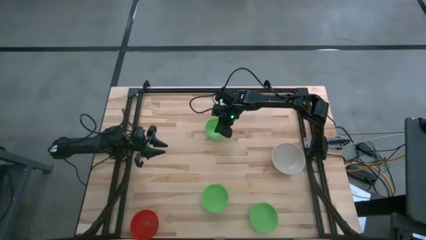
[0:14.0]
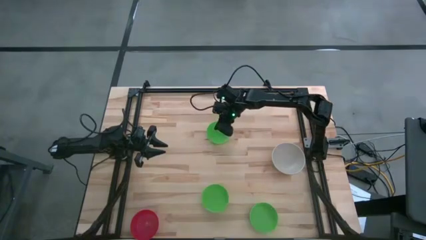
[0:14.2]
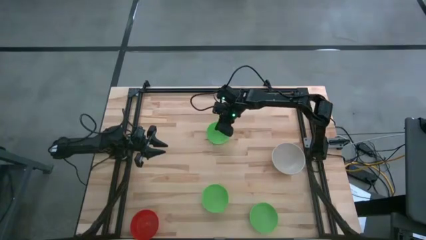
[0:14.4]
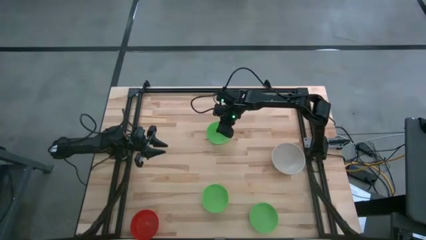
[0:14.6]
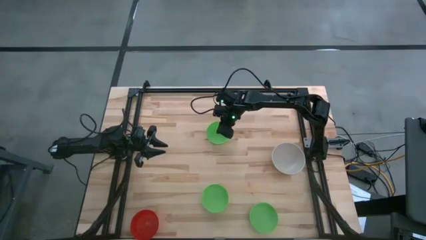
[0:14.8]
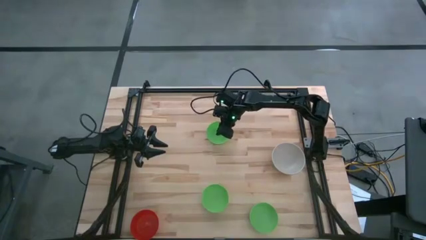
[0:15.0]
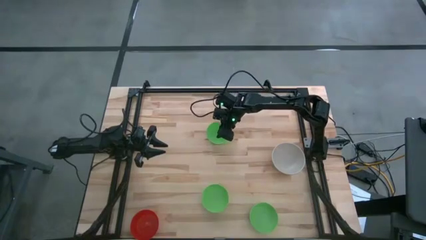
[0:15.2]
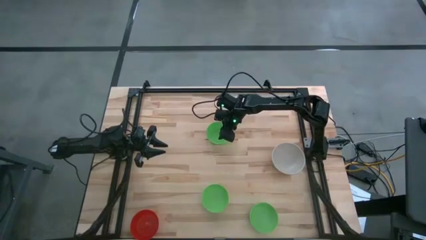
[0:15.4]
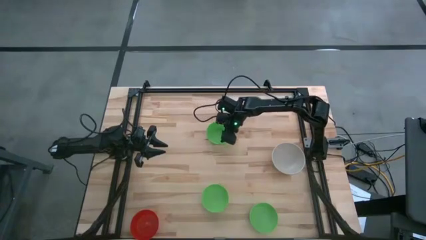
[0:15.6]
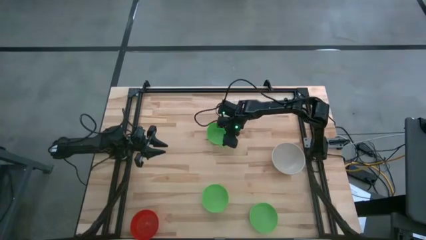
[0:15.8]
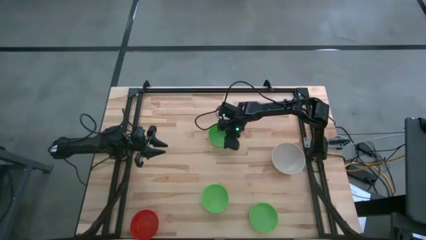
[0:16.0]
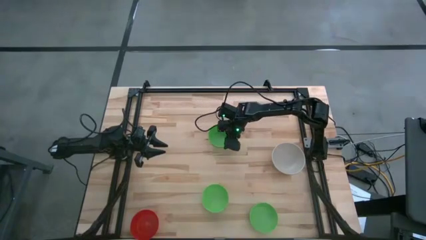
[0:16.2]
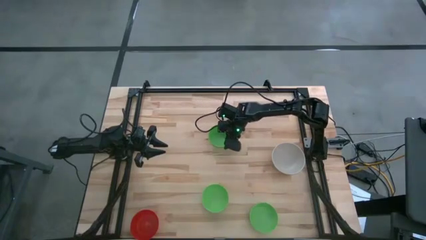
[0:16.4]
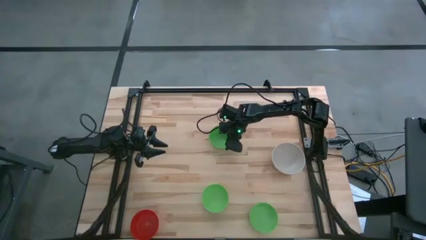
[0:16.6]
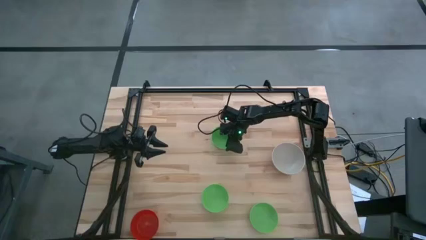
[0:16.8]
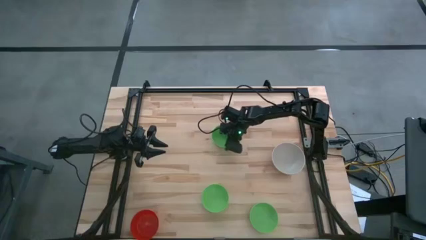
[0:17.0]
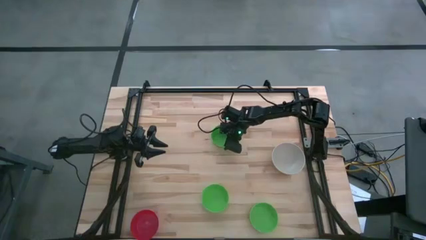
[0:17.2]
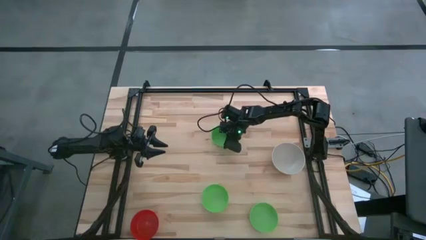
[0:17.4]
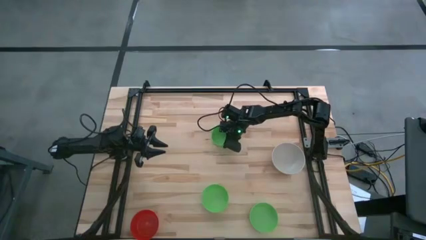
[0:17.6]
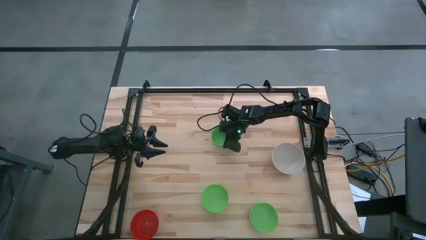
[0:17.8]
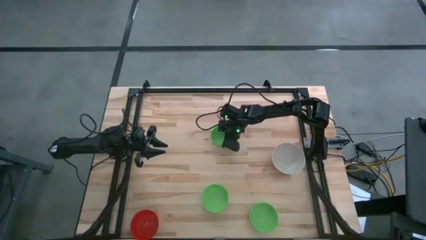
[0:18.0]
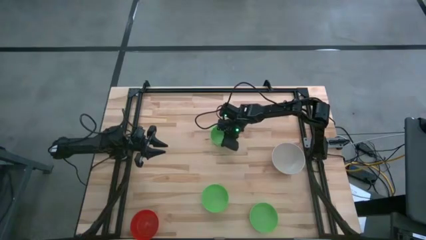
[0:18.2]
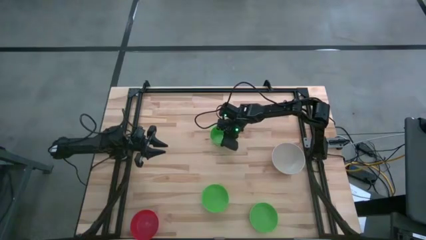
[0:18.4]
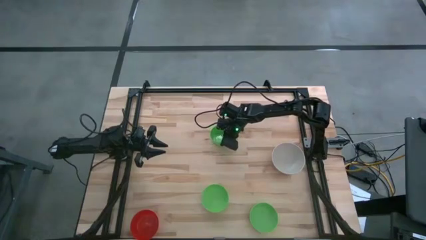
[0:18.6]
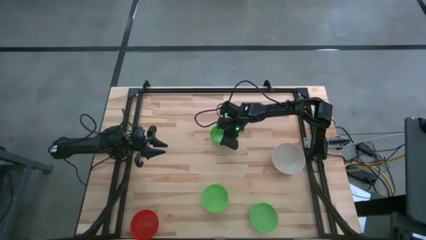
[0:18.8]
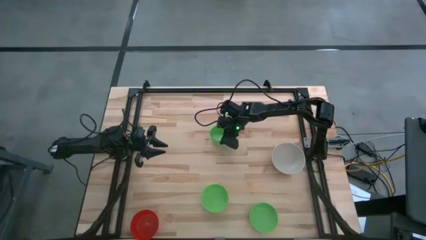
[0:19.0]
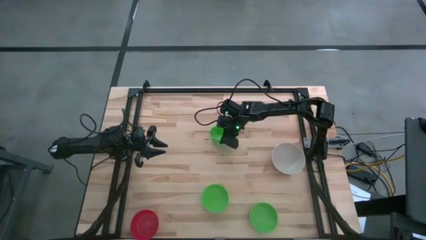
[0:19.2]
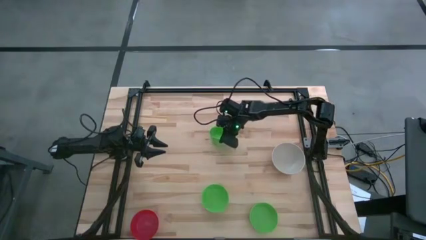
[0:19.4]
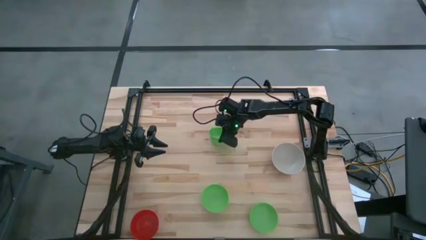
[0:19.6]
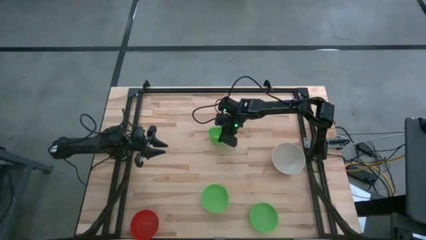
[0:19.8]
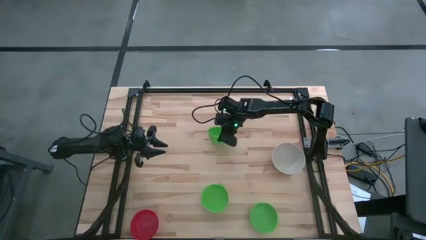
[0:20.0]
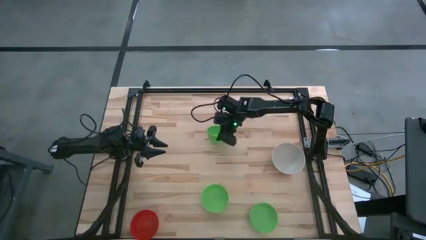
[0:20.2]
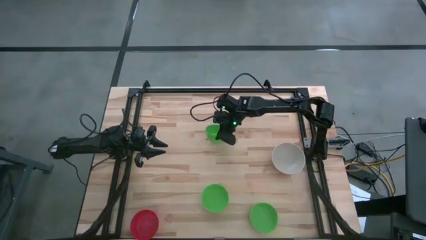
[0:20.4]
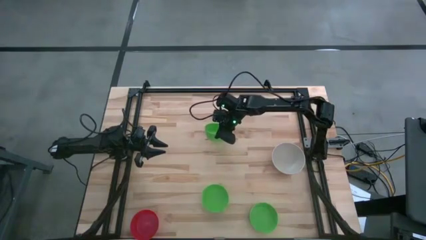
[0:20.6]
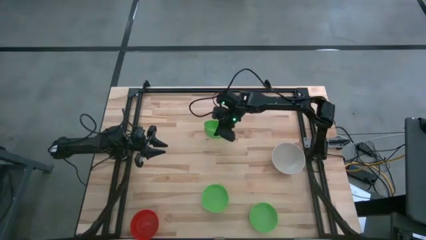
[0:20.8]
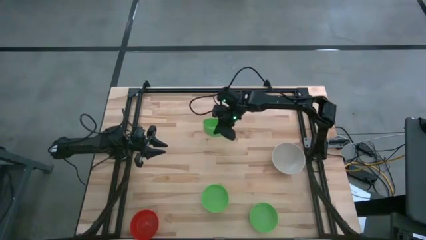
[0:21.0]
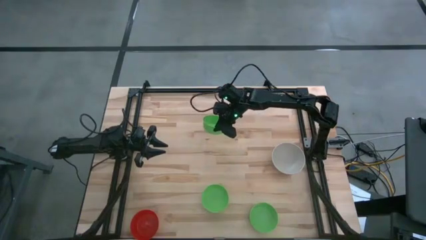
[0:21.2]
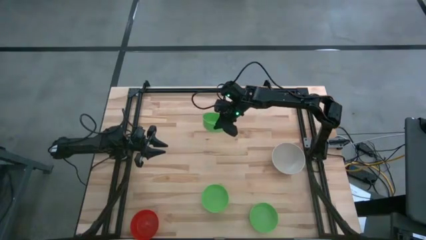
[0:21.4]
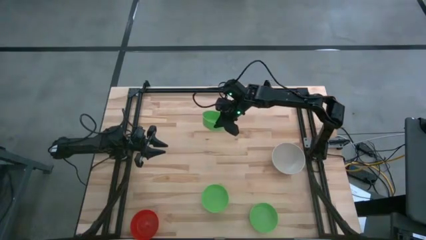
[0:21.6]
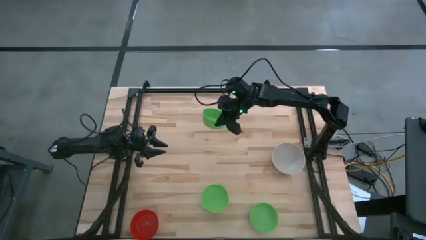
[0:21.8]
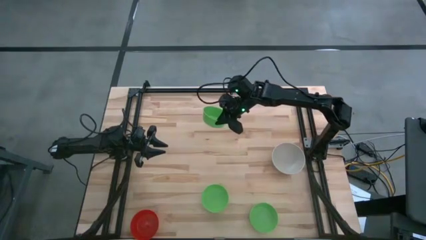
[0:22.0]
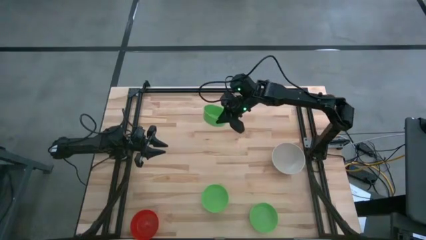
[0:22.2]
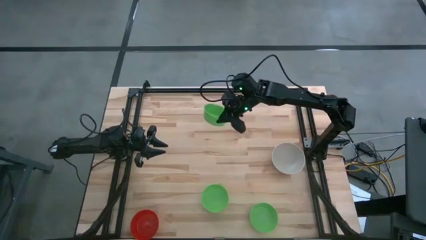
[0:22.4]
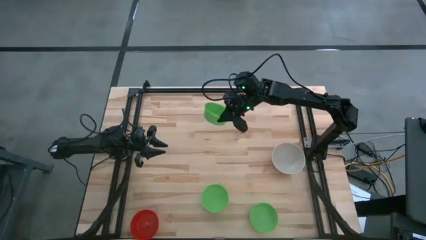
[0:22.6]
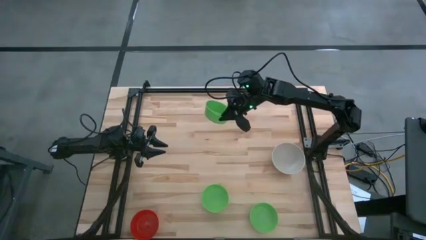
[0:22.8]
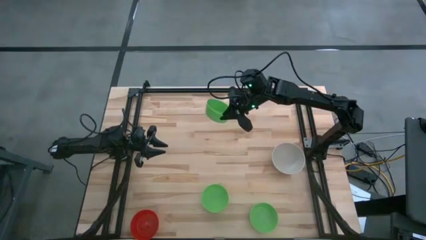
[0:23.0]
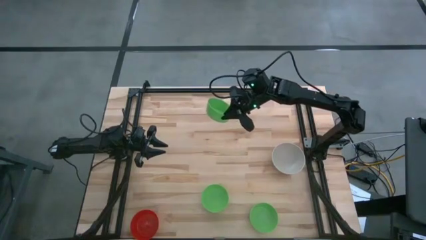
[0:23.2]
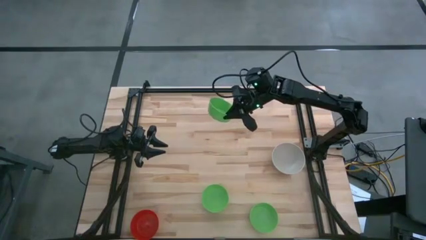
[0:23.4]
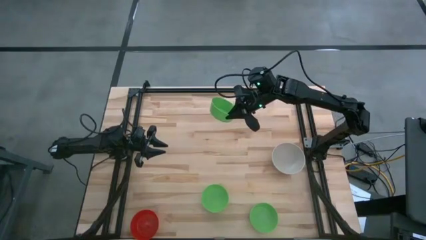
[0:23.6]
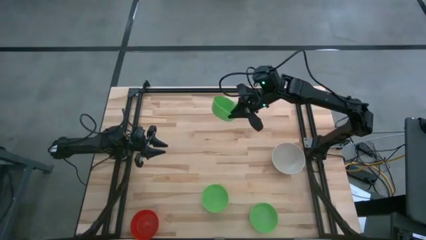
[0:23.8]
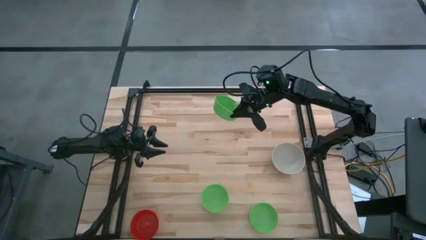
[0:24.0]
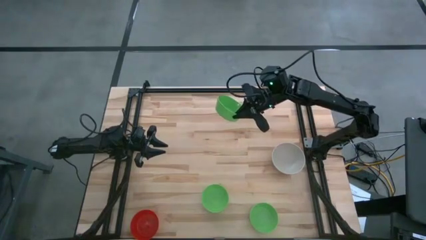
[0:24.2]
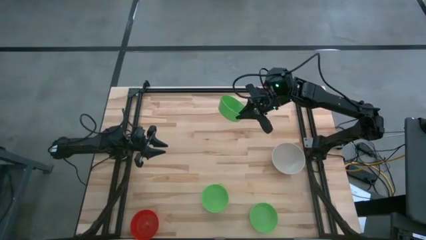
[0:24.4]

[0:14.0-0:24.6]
Stack the top green bowl on top of the white bowl

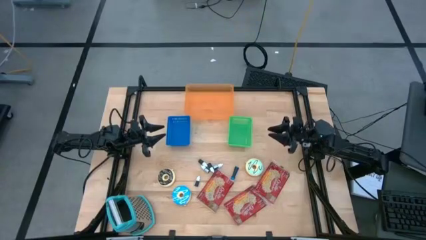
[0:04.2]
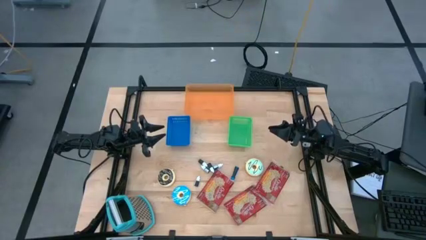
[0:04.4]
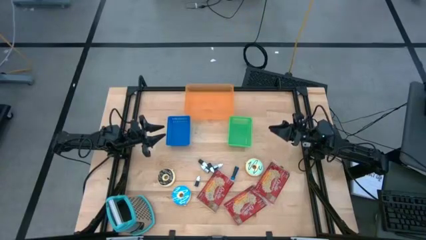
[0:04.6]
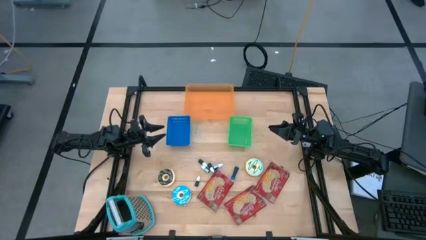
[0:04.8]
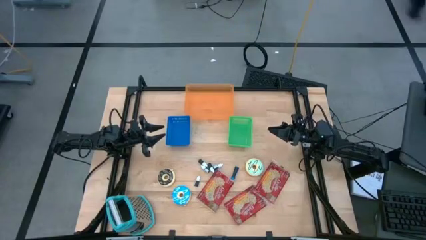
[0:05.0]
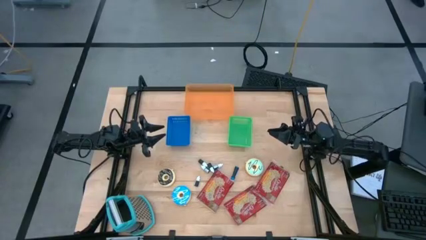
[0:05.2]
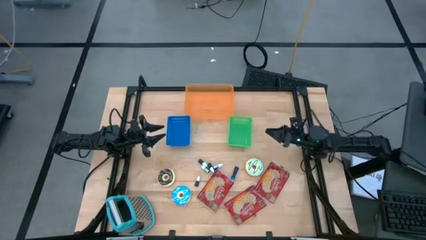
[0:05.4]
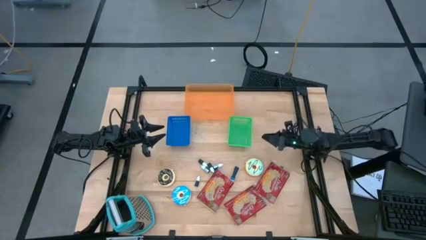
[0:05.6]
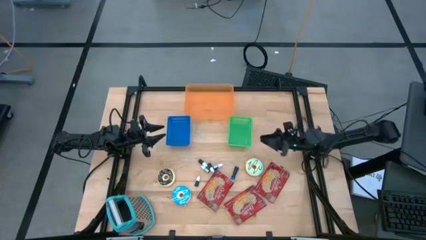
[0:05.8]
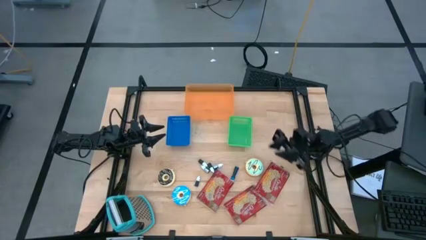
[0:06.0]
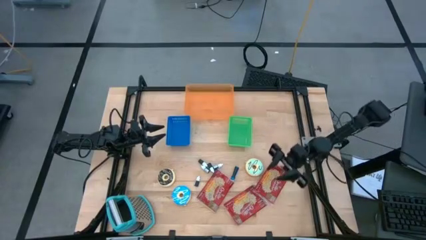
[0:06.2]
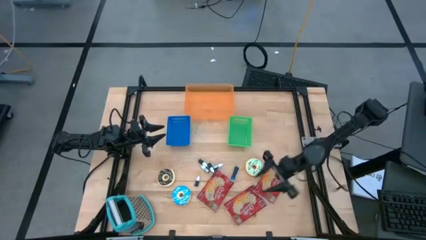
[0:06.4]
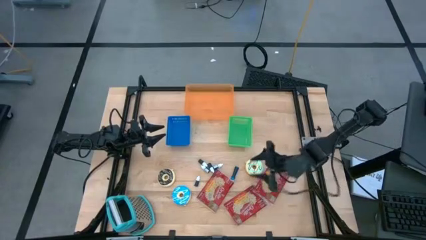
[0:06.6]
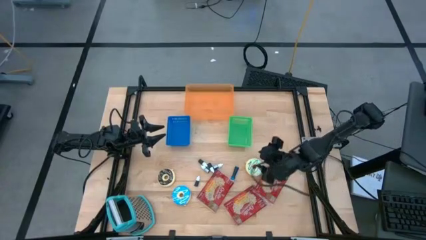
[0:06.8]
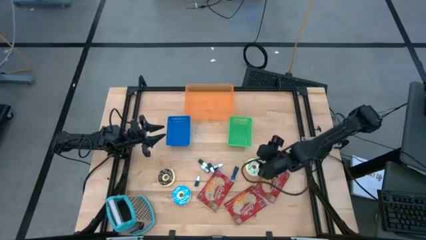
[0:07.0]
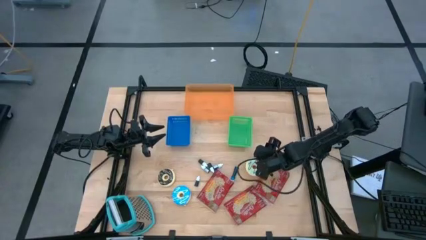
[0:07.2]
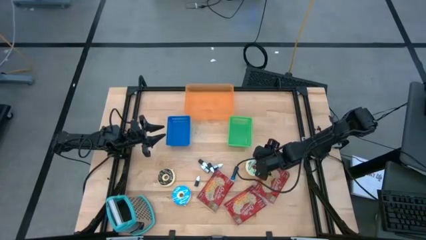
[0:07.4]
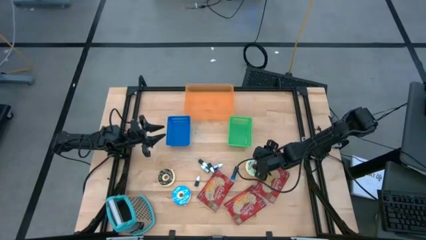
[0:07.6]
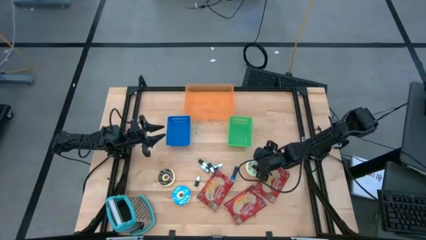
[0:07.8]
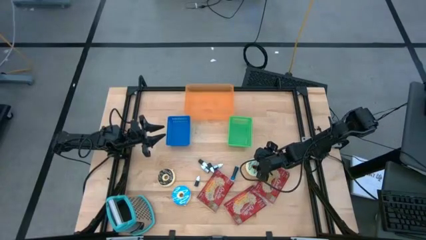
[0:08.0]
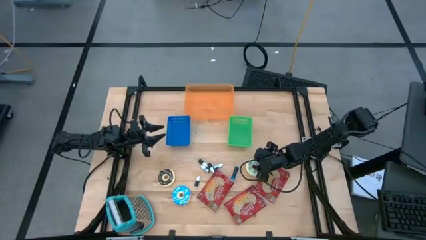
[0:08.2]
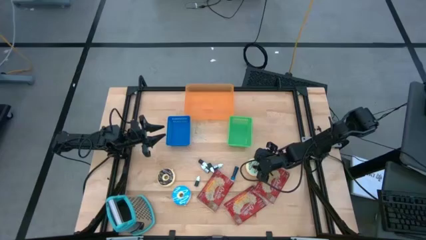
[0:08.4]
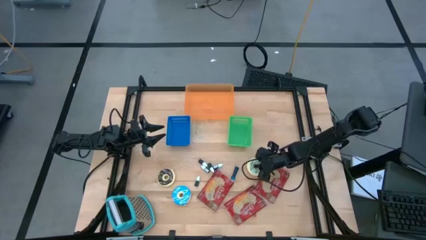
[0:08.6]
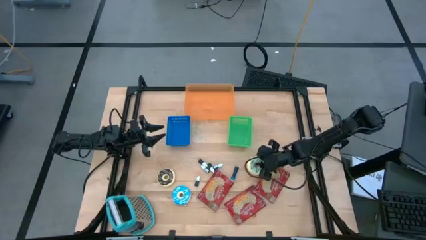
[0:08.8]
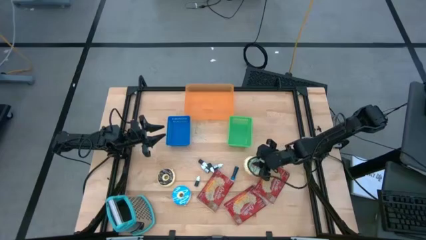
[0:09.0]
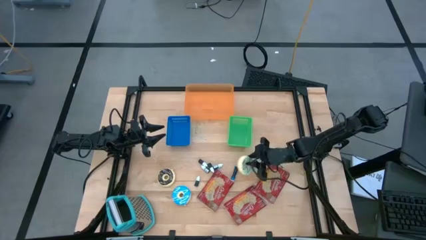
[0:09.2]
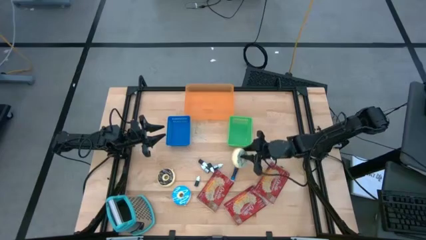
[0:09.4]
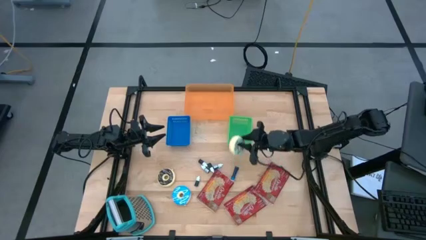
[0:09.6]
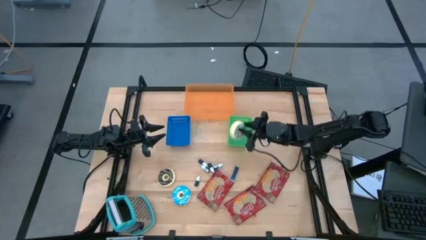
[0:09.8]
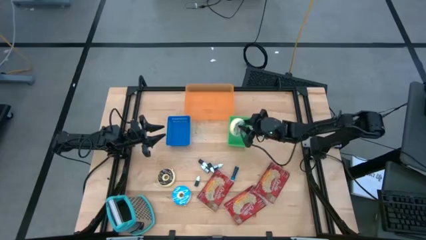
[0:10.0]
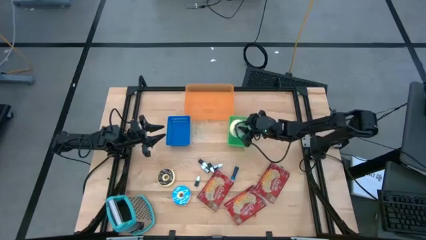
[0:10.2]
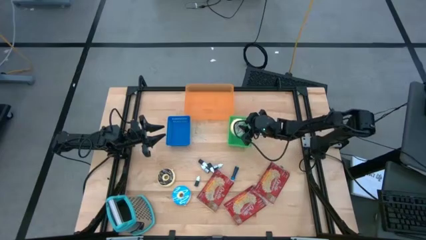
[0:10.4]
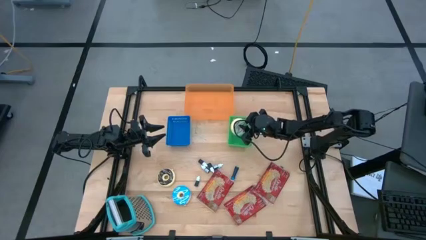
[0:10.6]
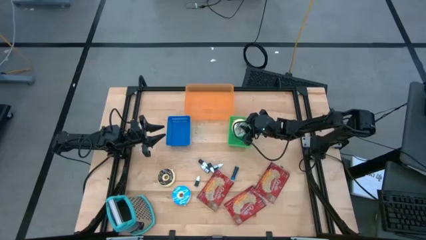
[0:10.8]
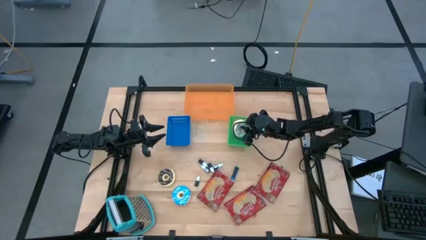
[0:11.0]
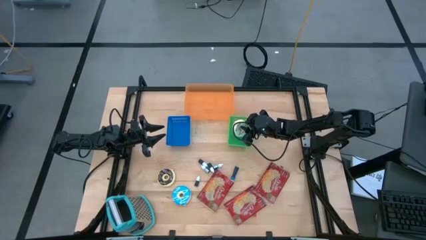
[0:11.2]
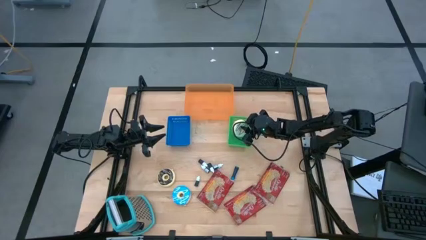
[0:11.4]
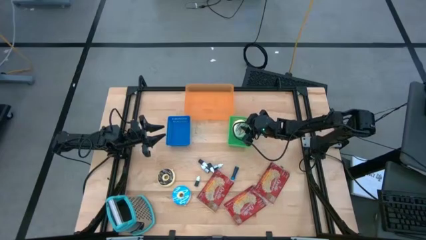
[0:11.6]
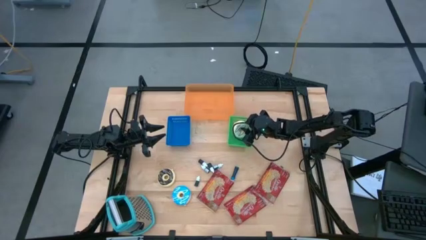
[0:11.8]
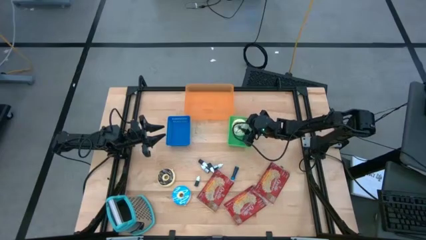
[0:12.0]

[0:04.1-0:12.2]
Put the light blue doughnut into the green bin
